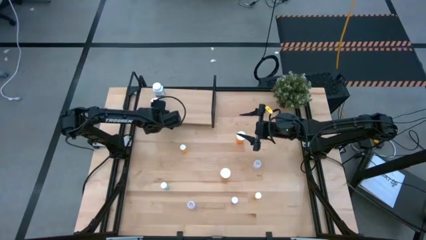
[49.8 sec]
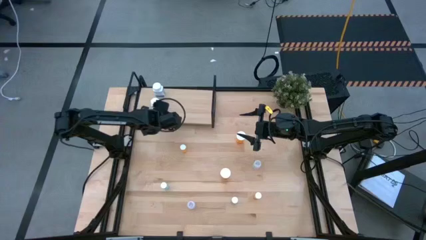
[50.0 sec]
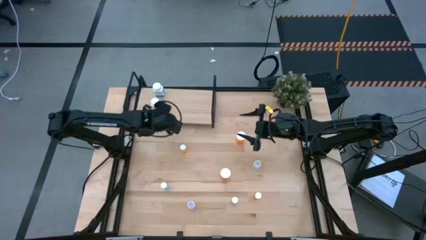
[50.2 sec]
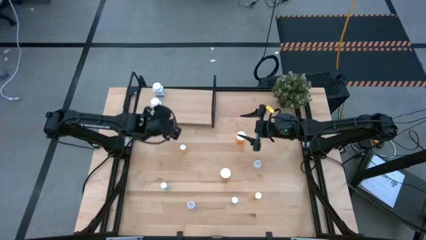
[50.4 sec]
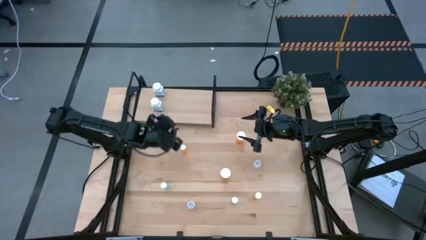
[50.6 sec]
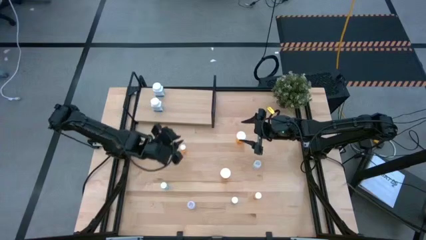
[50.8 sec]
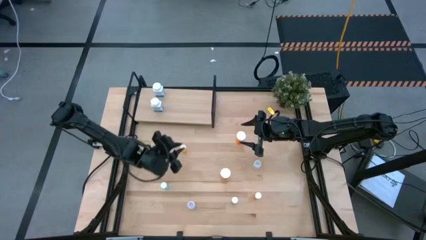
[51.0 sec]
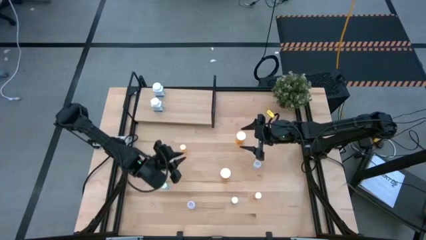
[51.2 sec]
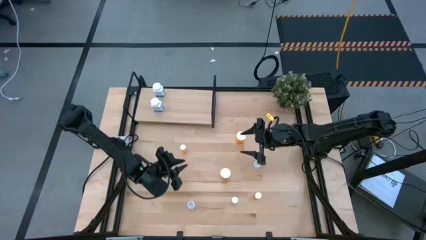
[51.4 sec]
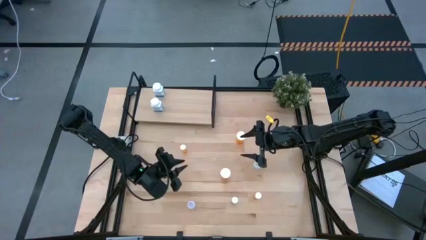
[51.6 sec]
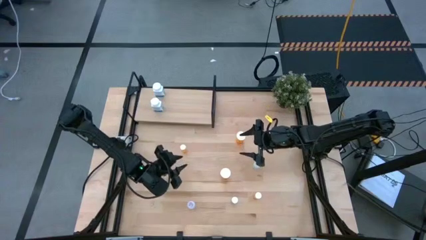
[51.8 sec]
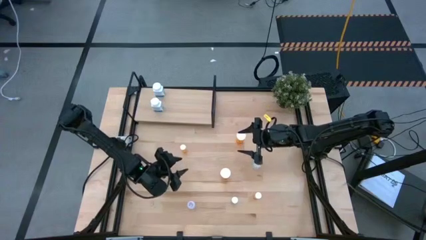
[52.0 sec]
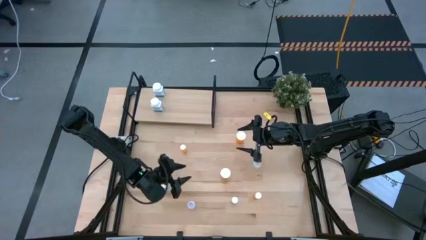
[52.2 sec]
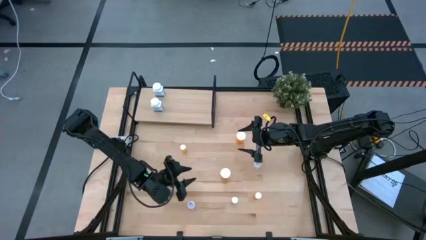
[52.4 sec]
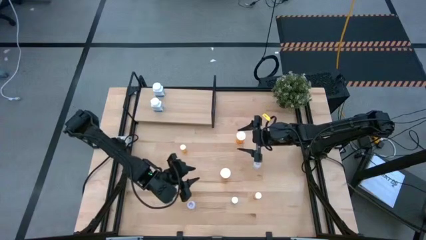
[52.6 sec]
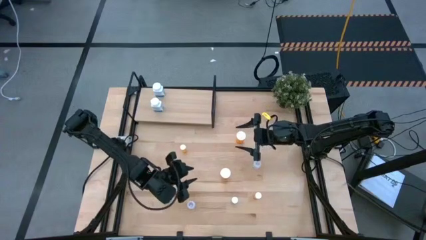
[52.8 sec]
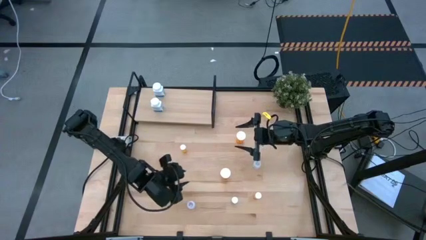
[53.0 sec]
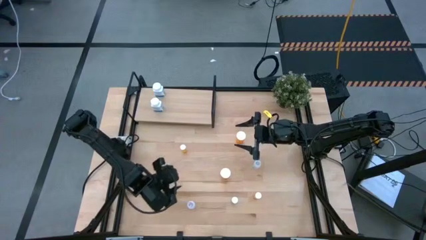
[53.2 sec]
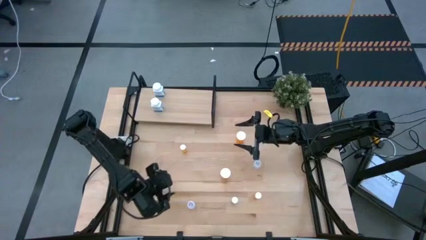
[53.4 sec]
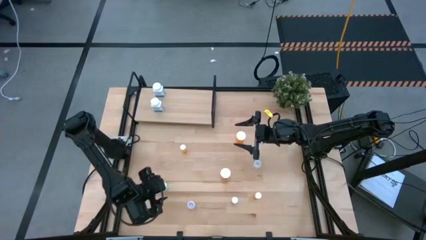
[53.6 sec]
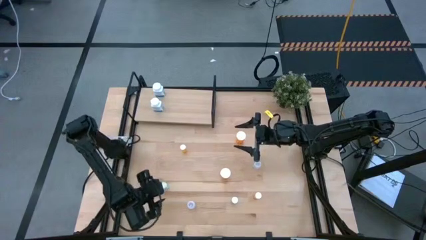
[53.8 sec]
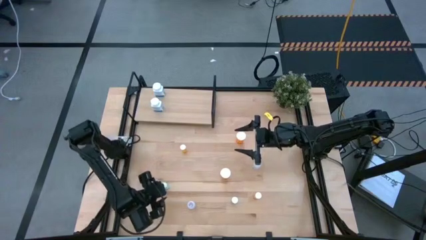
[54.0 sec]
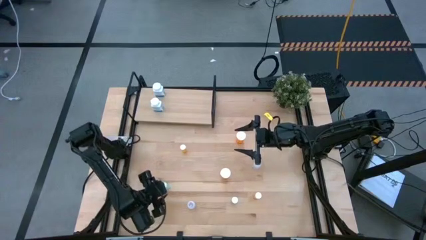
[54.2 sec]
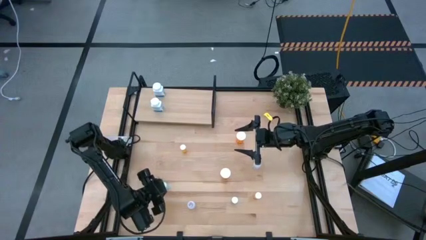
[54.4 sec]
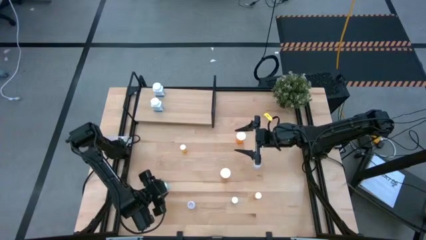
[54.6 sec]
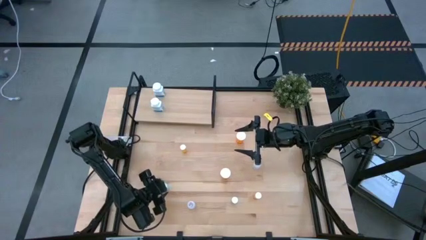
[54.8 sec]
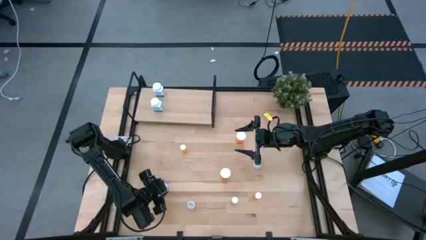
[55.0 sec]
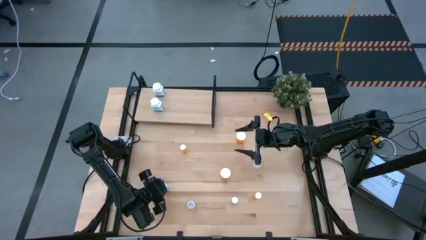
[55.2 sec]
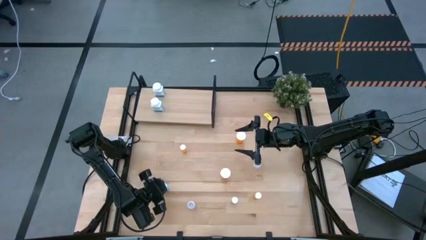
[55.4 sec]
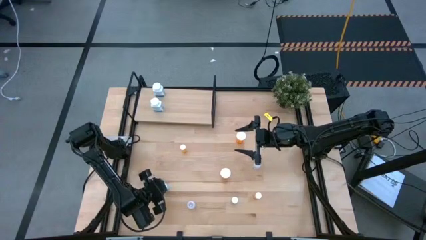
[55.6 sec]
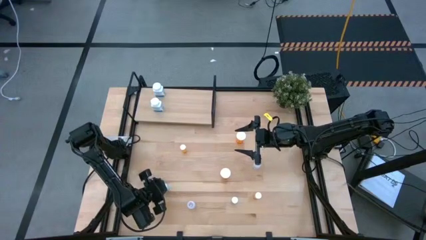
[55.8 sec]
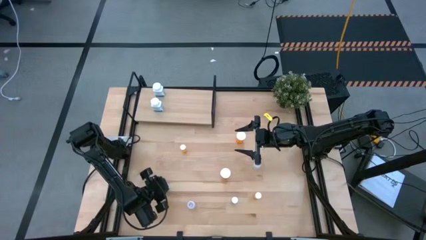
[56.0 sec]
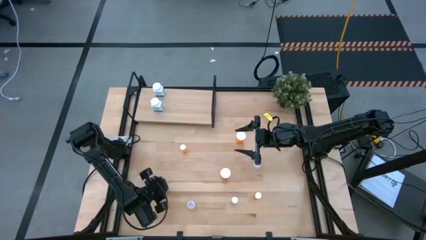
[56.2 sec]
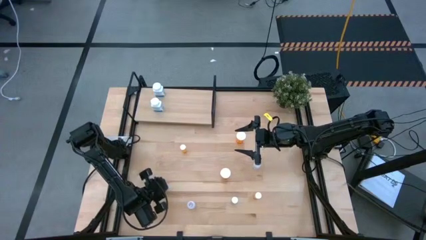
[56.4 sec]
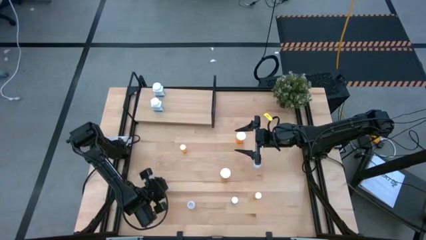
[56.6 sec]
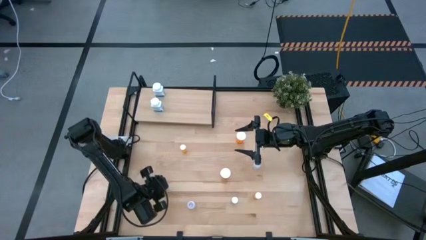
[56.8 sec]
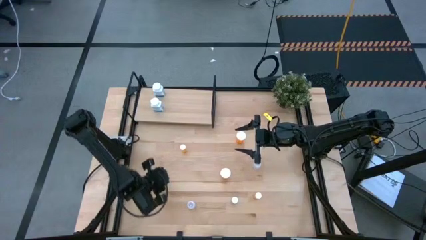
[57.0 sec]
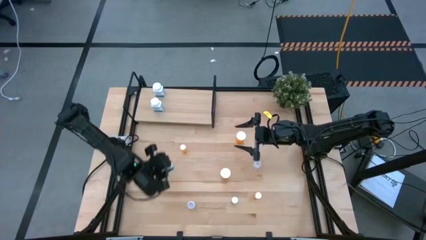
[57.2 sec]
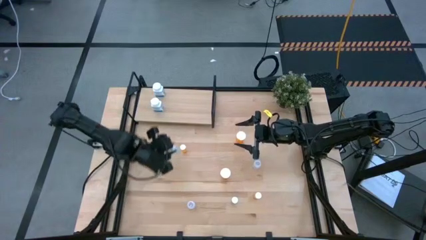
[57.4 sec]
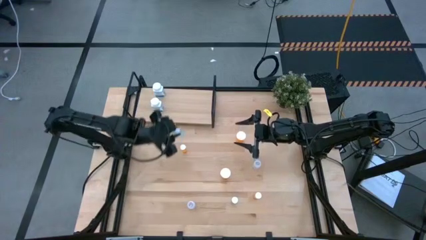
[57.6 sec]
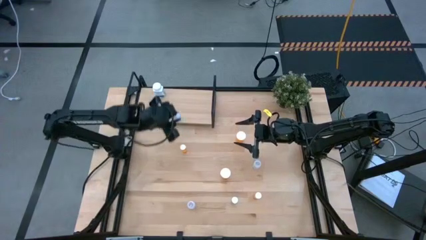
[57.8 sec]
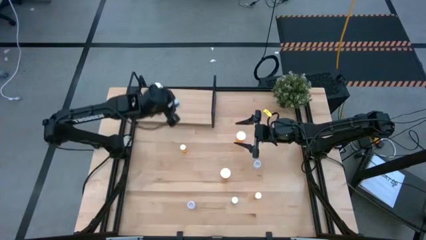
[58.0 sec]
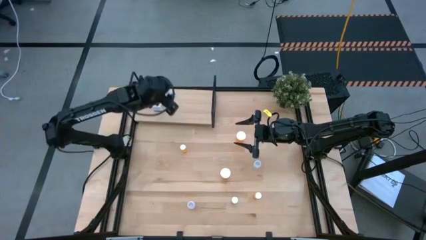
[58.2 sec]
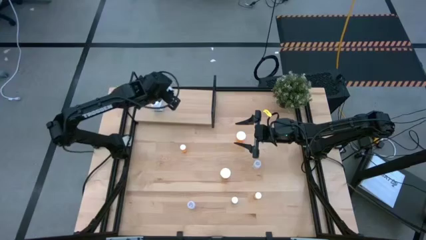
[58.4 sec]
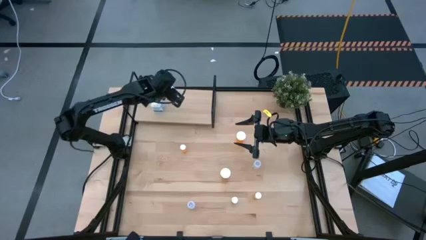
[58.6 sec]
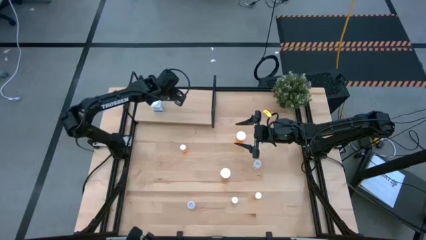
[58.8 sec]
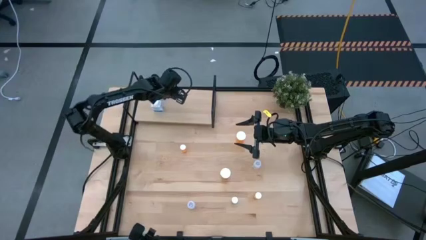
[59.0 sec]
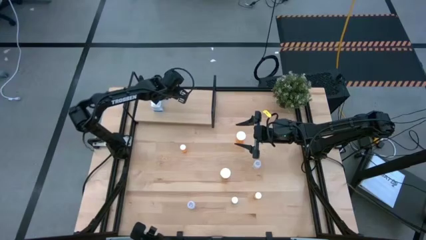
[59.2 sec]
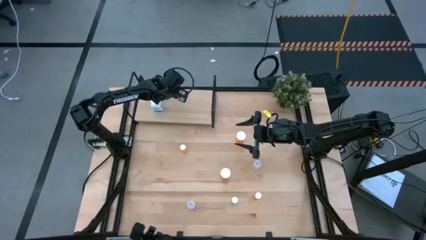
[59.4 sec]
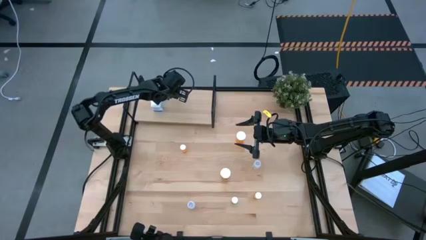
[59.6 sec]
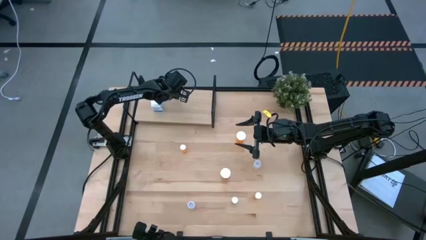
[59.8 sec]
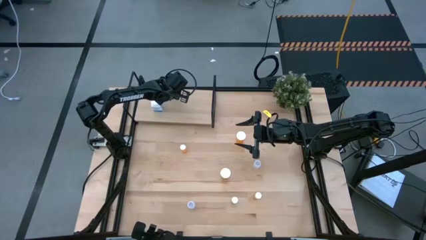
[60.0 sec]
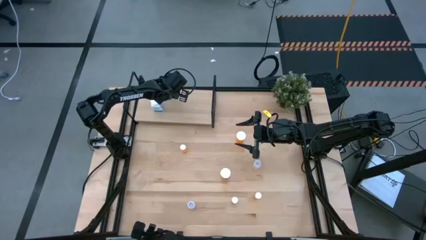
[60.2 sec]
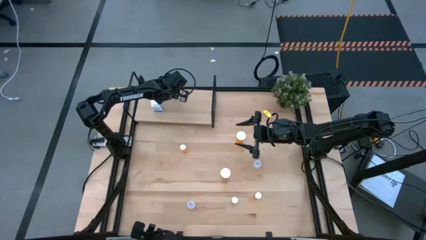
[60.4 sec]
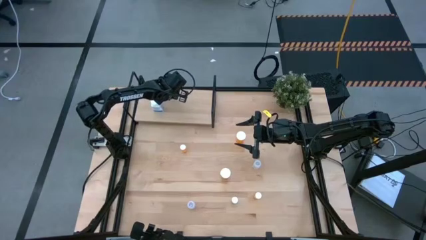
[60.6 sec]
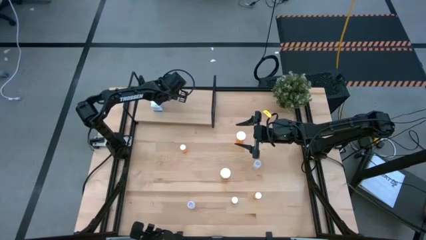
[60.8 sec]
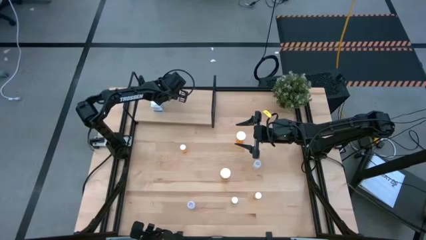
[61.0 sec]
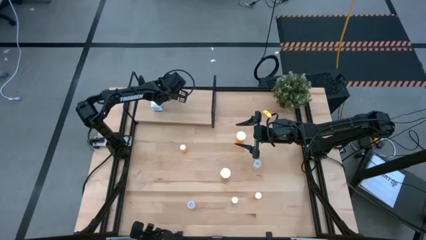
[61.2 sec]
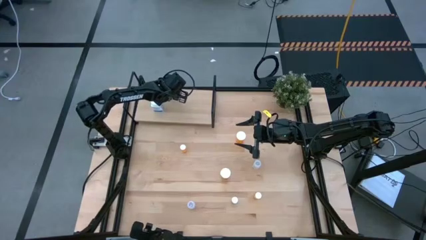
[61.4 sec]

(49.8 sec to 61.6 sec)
Task: Pick and place medicine bottles onto shelf by color
Put the left blue pill bottle on the shelf
